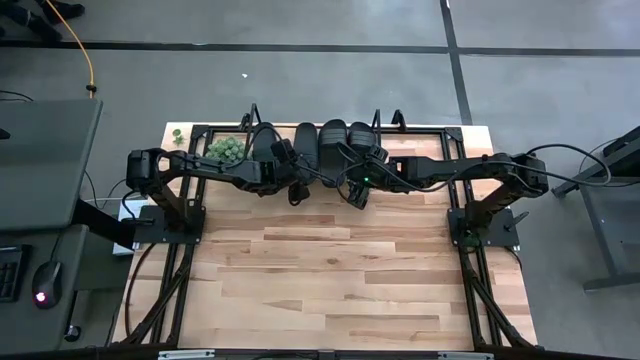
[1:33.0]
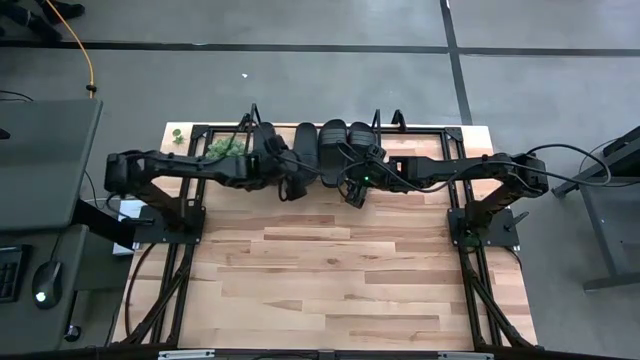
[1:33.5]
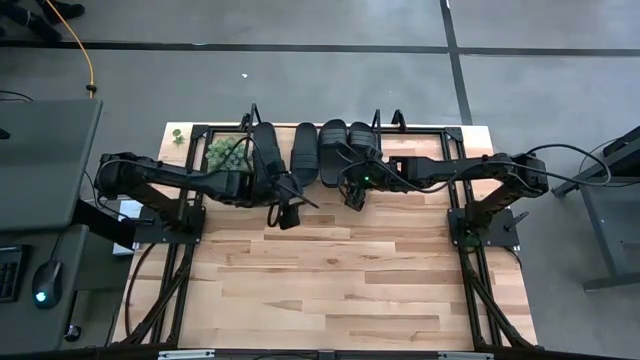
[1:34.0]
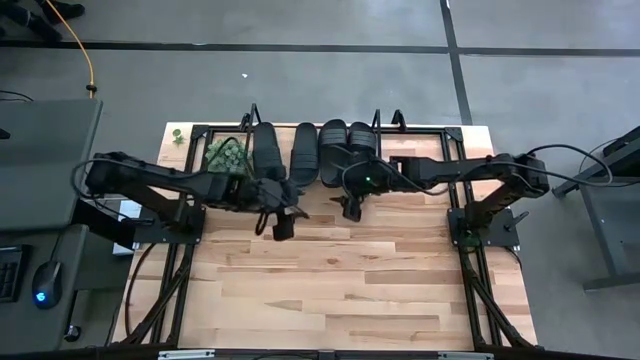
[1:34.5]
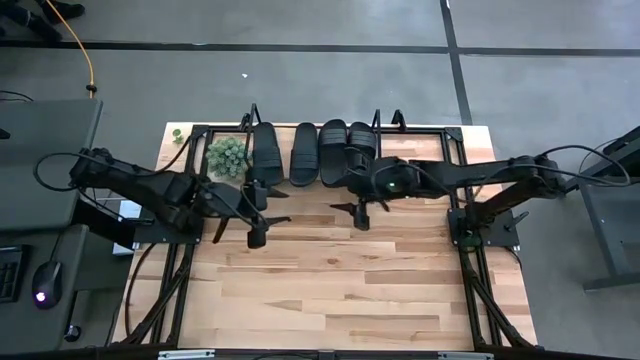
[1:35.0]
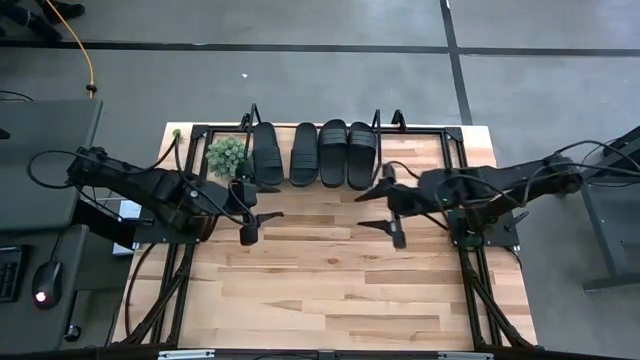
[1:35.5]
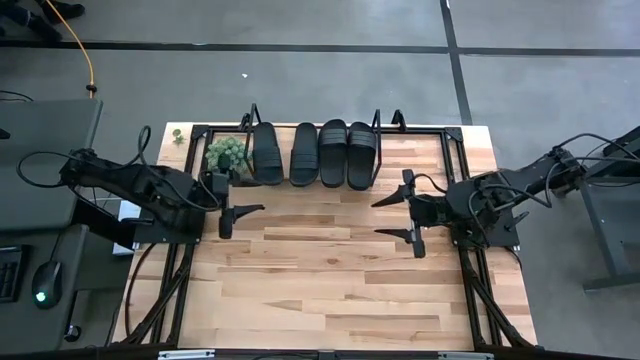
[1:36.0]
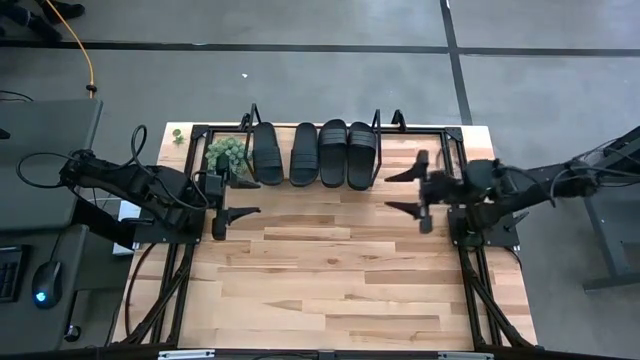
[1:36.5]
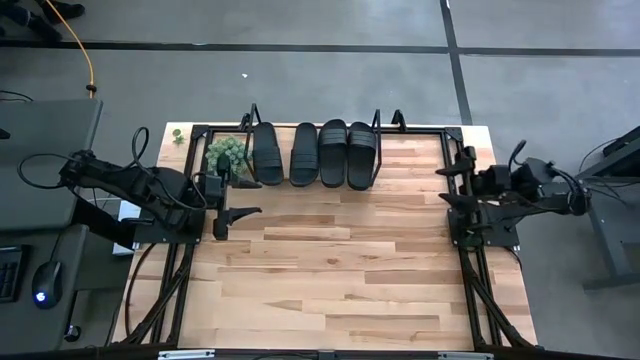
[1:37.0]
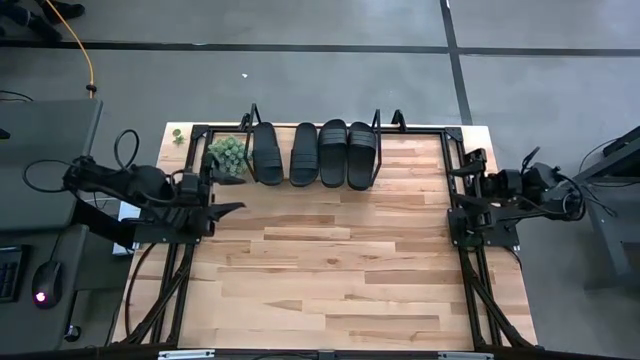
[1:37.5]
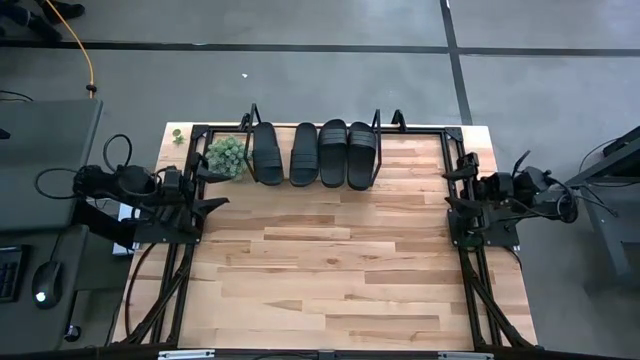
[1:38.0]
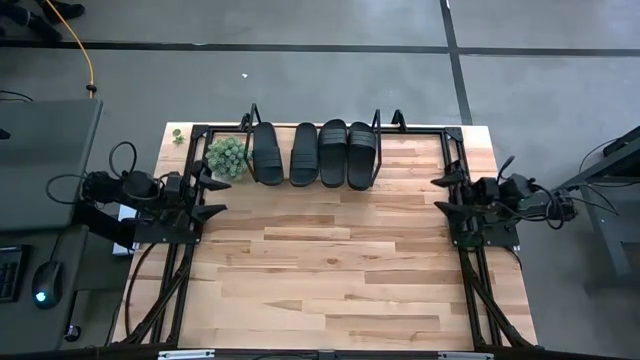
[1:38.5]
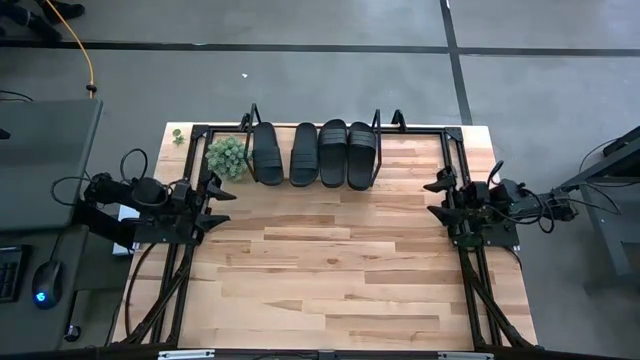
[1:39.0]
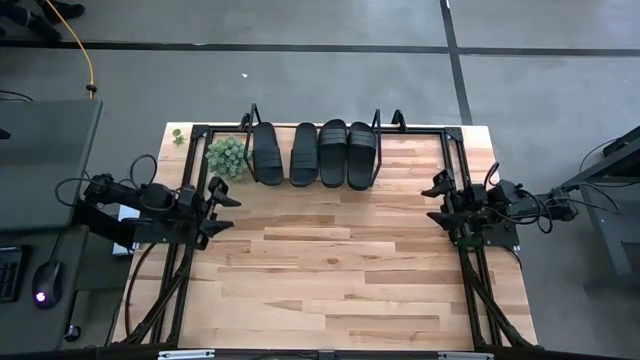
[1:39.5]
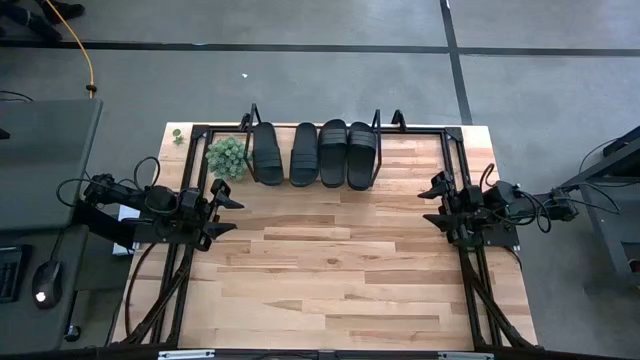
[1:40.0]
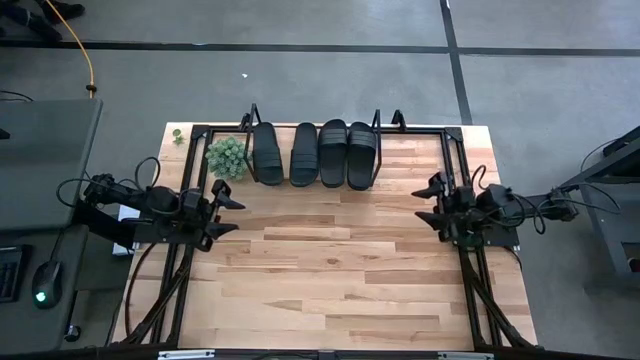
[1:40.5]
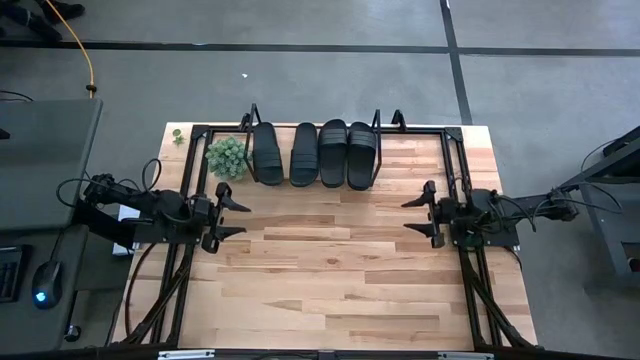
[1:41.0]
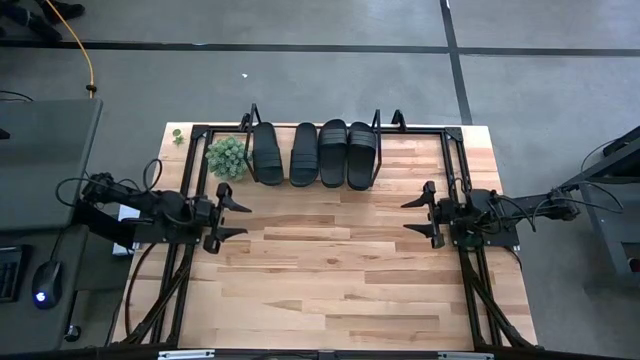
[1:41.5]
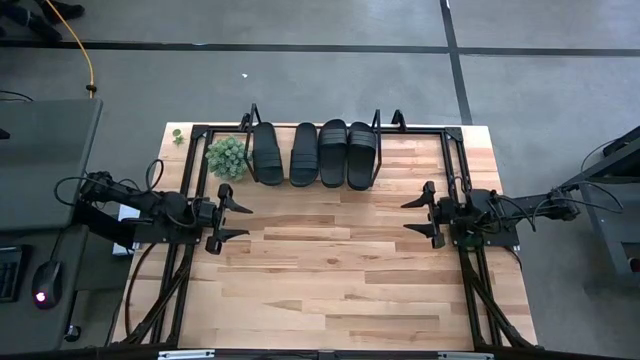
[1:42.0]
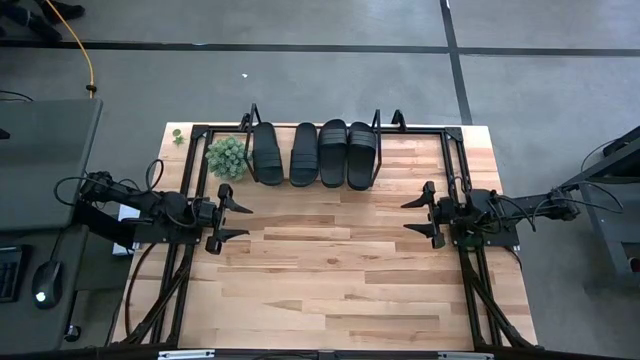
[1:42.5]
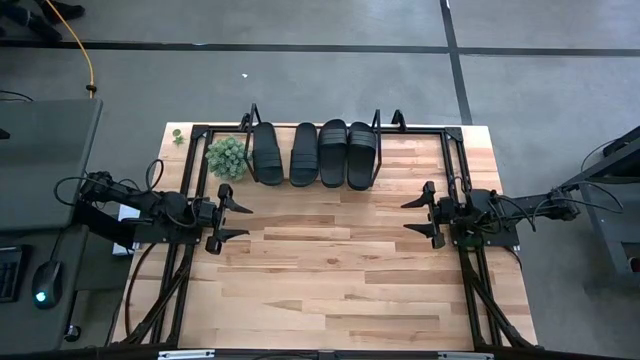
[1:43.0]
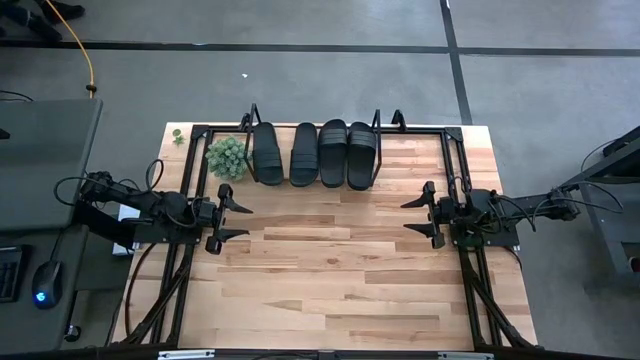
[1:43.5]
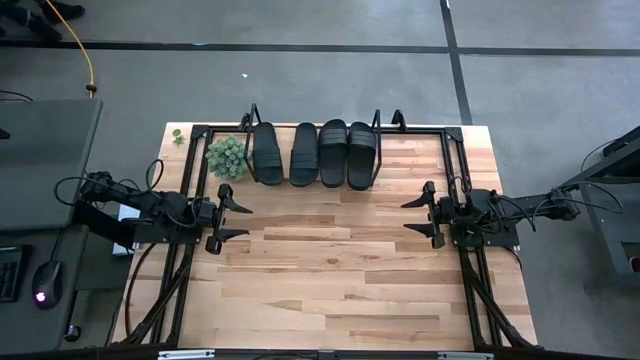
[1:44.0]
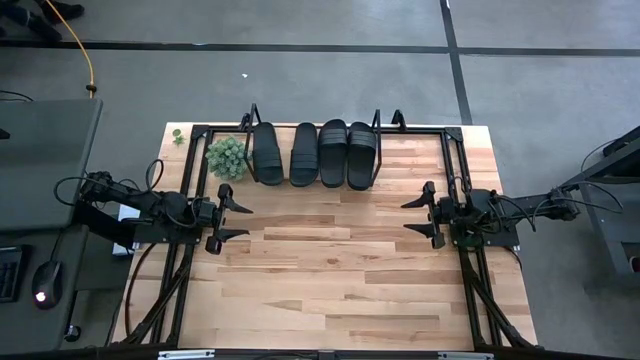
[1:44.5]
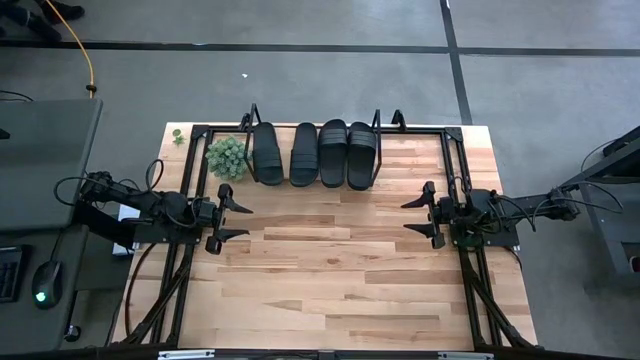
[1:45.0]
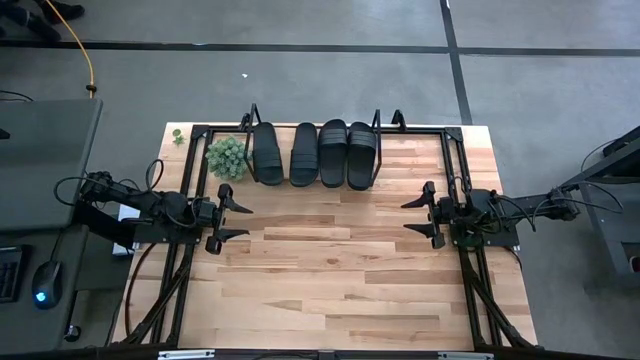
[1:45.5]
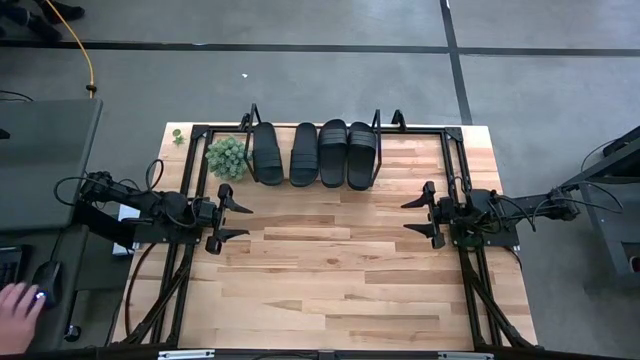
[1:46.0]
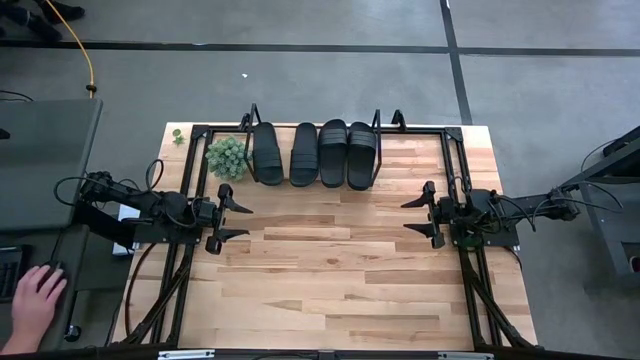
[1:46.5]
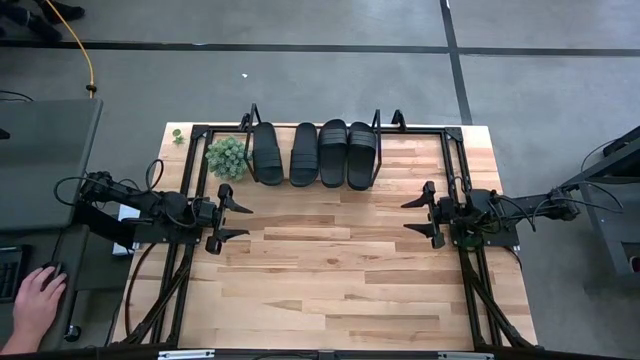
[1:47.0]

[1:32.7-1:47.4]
Task: Pick and place slides into the shelf
Return to Home Position

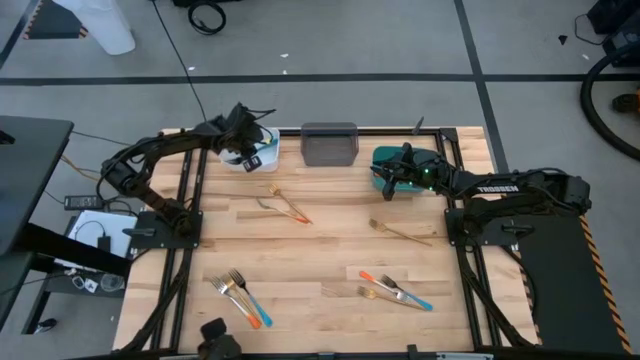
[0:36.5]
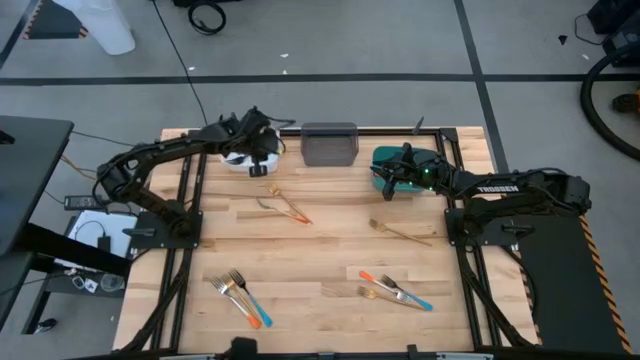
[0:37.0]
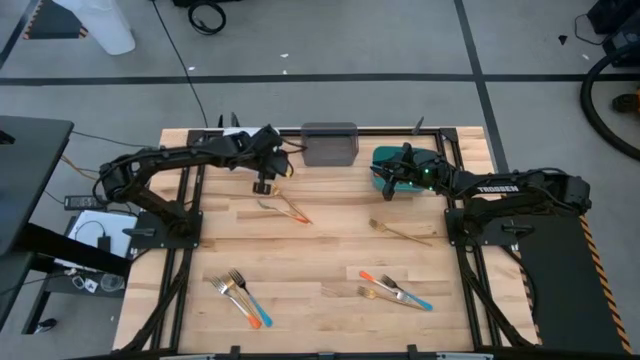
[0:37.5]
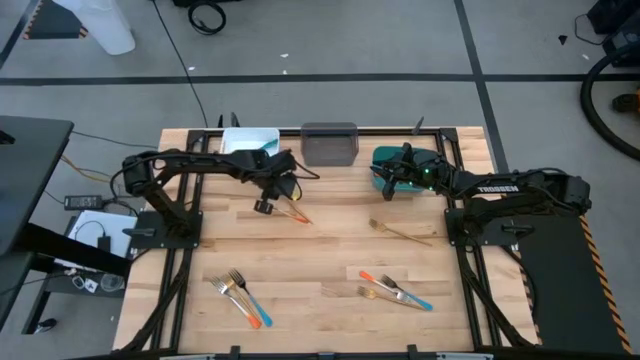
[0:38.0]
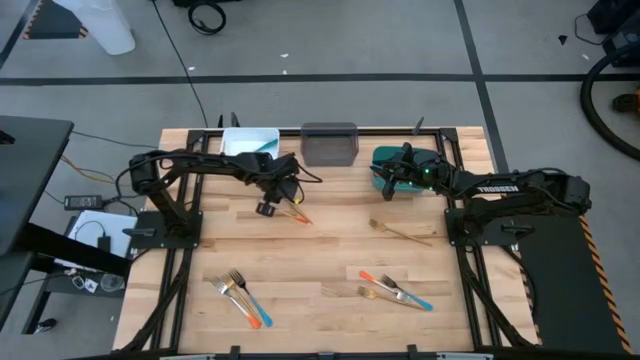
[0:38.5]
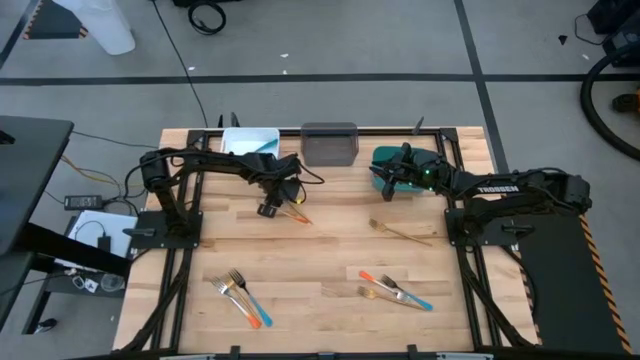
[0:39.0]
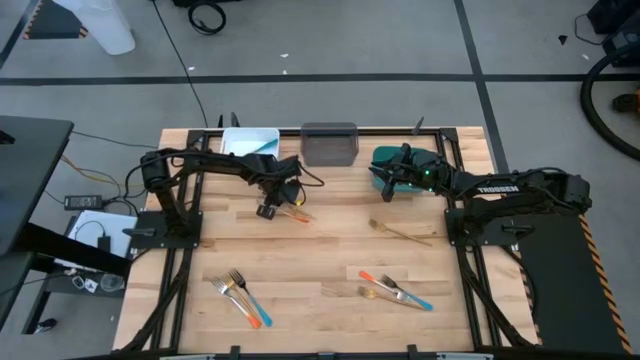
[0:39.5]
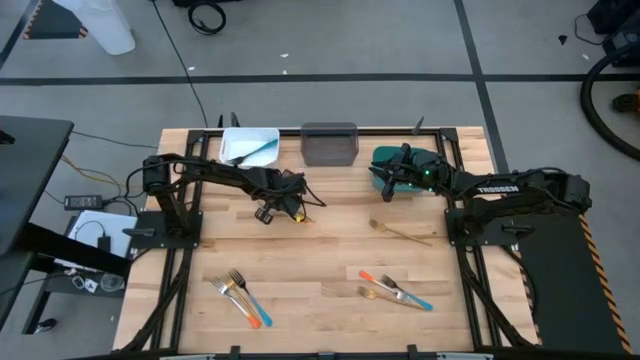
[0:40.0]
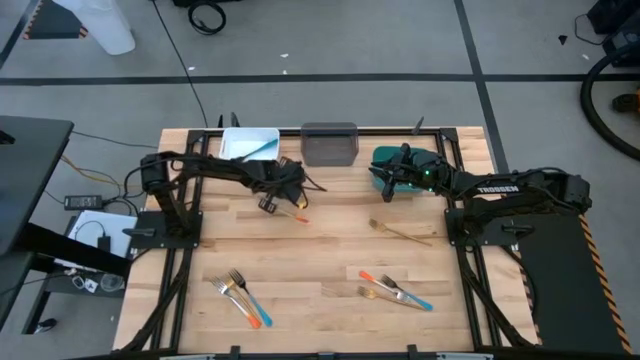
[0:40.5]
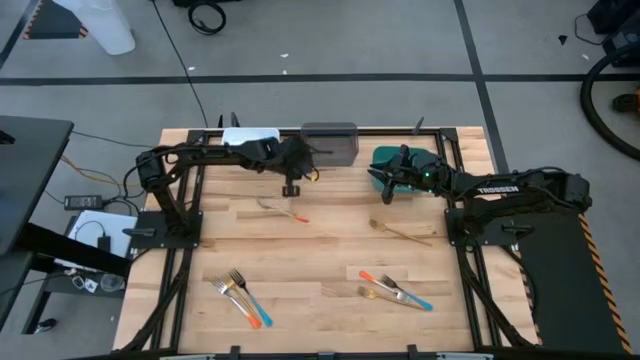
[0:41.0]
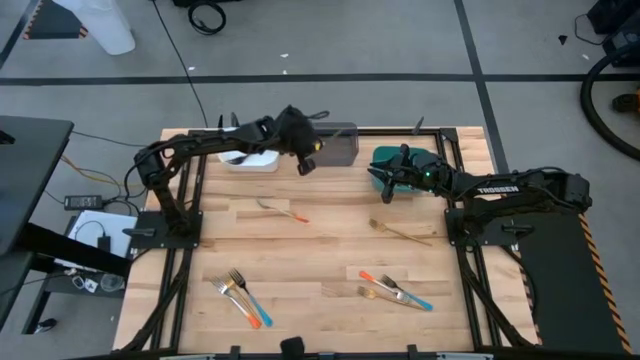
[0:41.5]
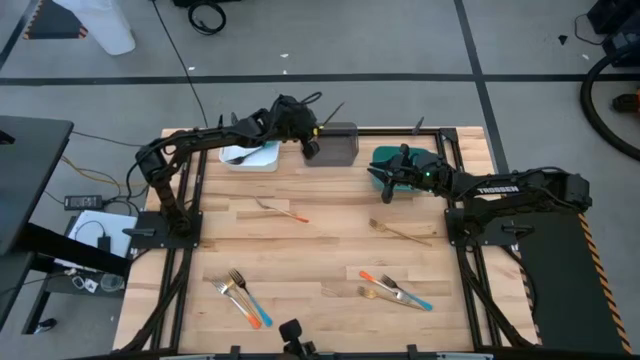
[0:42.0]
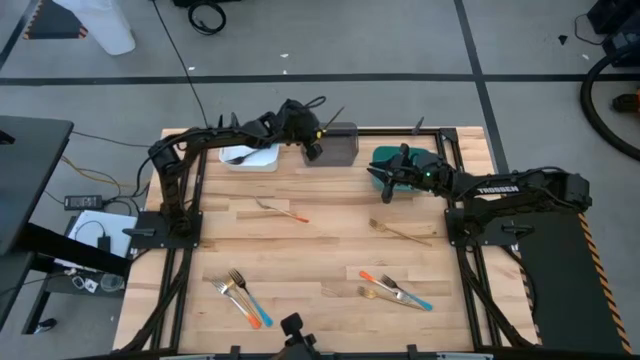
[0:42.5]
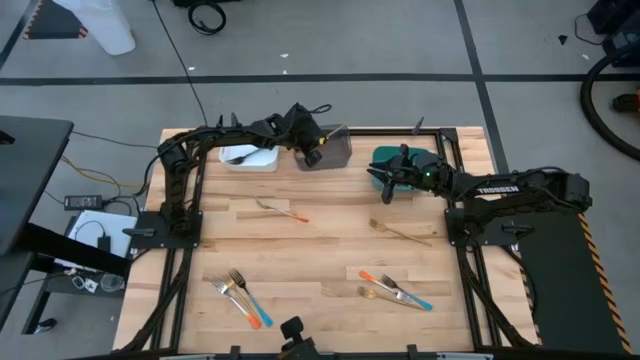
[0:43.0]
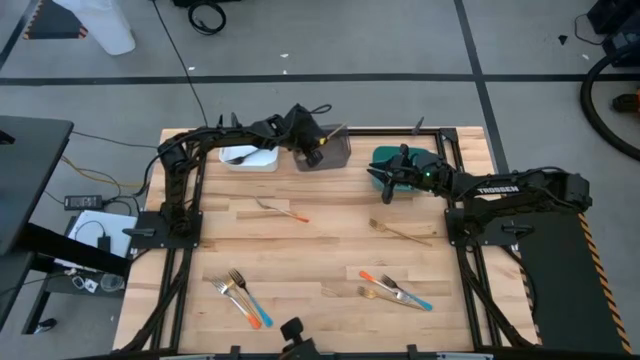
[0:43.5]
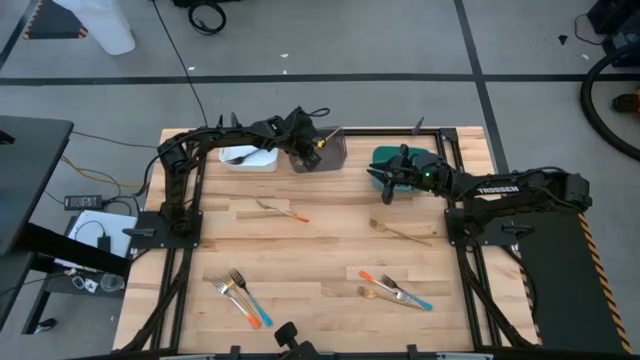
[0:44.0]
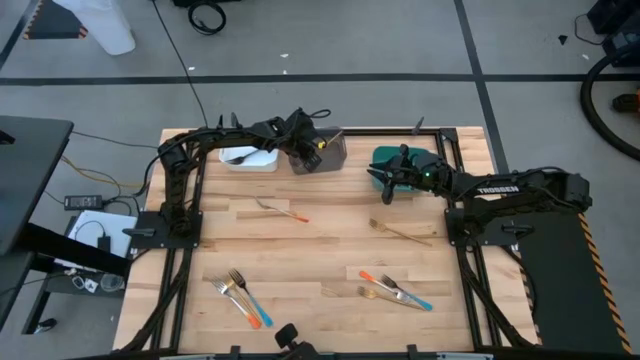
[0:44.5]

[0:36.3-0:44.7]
Task: Sort silverware by color (type)
Put the gold fork into the black bin
